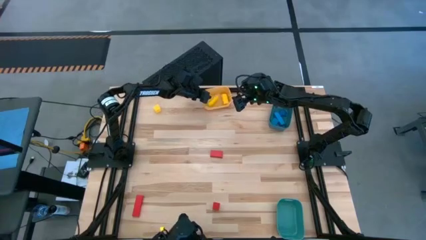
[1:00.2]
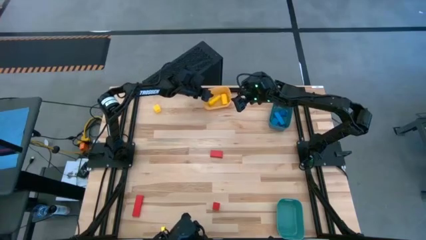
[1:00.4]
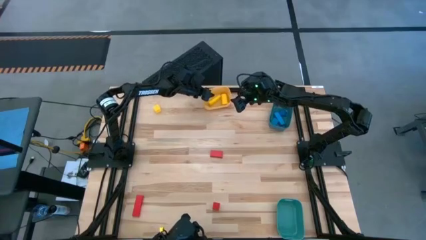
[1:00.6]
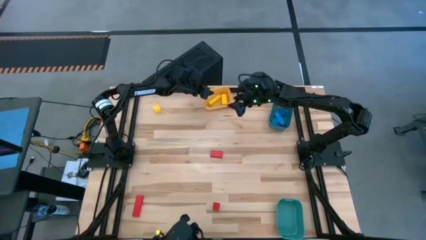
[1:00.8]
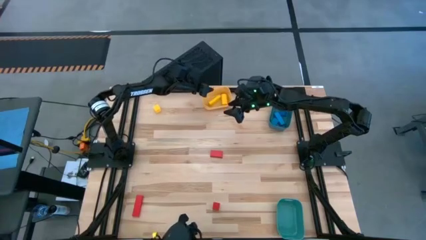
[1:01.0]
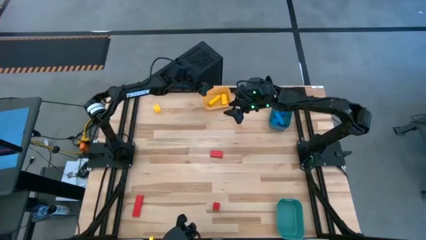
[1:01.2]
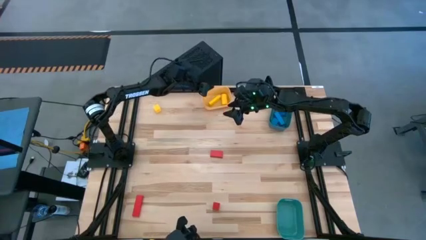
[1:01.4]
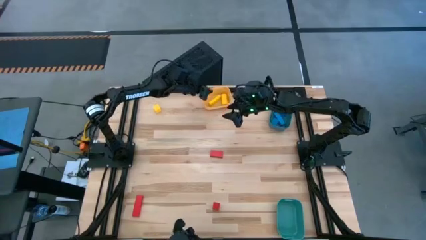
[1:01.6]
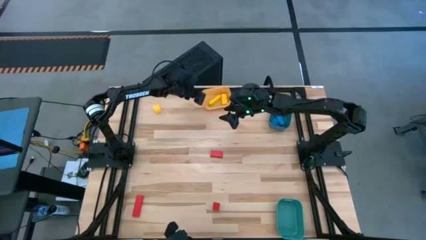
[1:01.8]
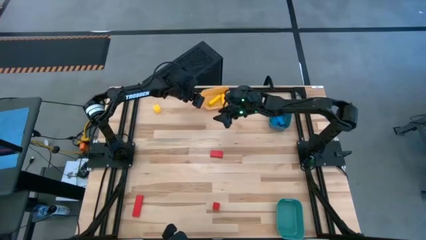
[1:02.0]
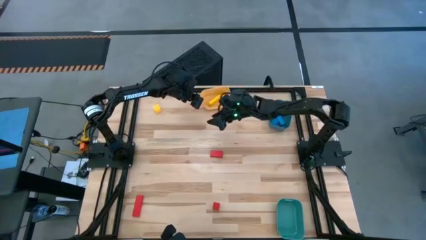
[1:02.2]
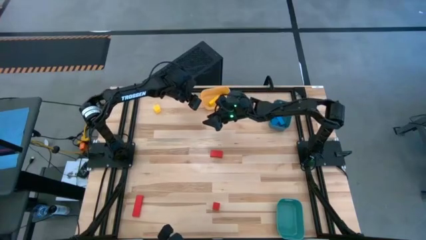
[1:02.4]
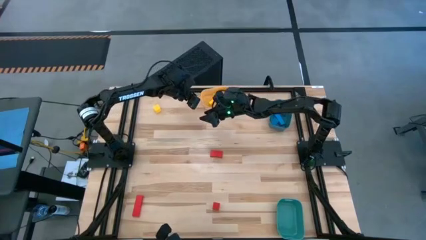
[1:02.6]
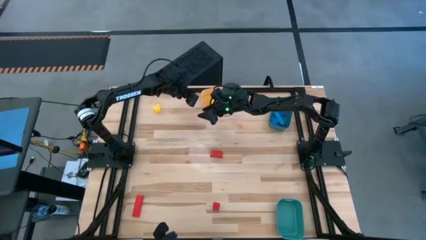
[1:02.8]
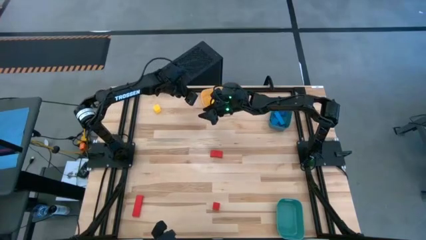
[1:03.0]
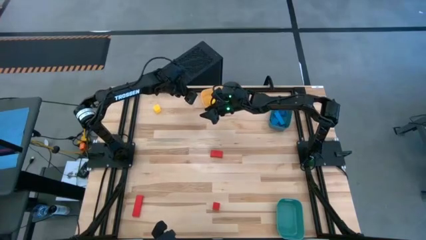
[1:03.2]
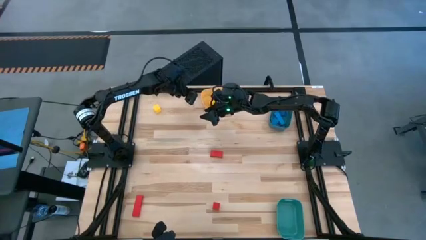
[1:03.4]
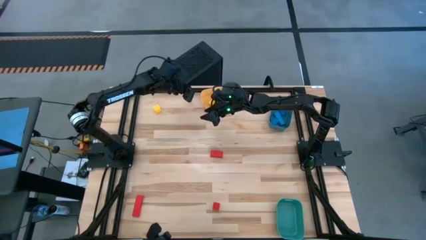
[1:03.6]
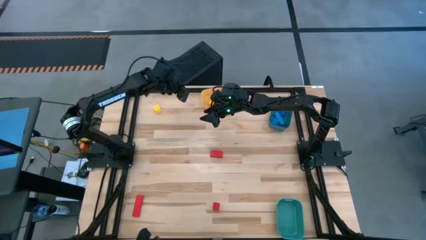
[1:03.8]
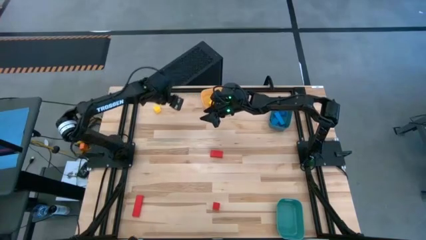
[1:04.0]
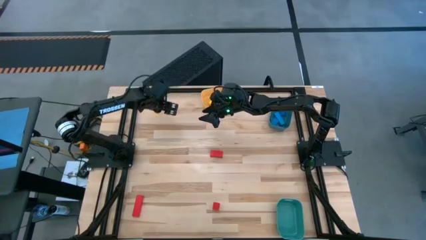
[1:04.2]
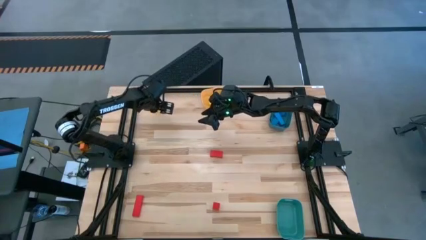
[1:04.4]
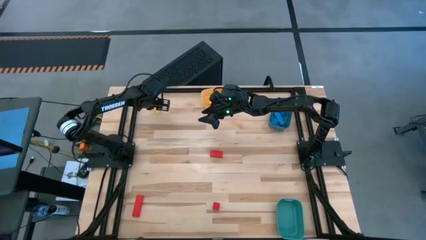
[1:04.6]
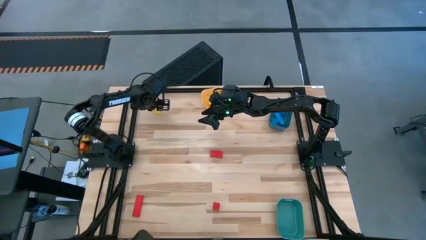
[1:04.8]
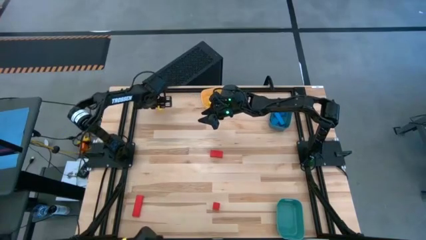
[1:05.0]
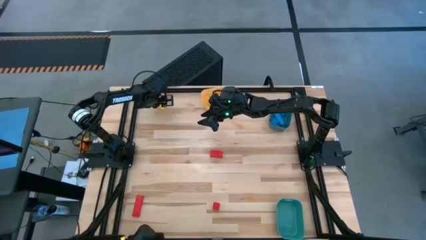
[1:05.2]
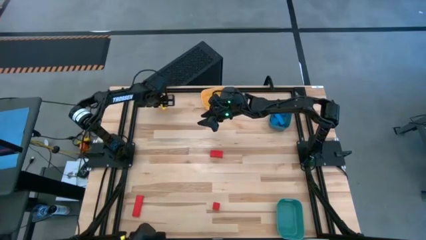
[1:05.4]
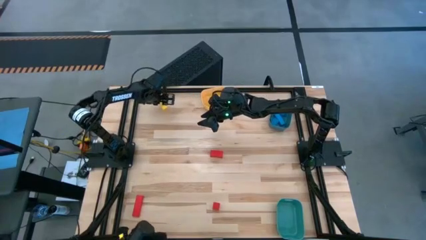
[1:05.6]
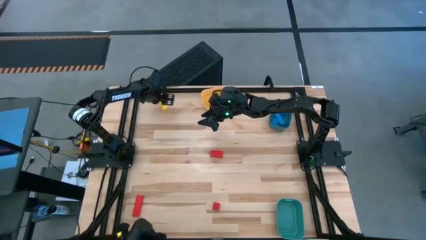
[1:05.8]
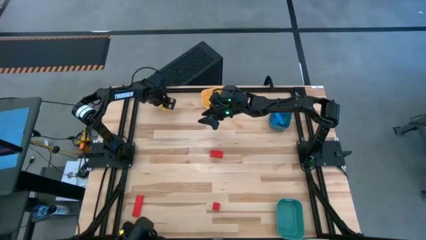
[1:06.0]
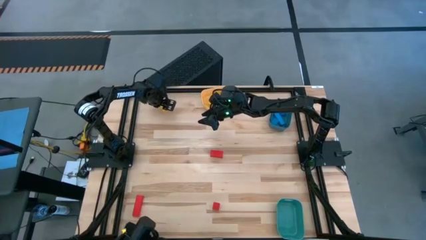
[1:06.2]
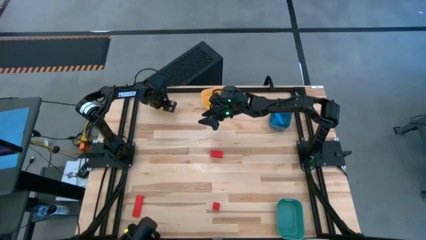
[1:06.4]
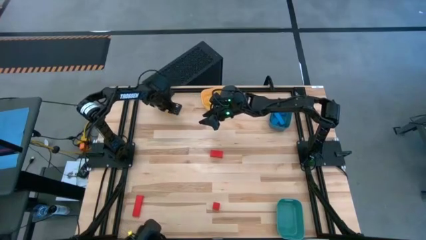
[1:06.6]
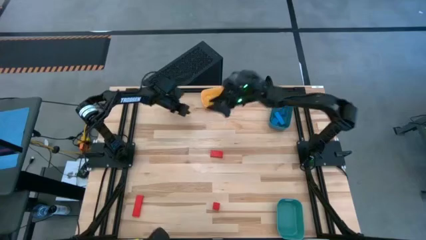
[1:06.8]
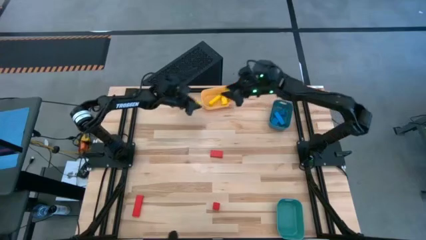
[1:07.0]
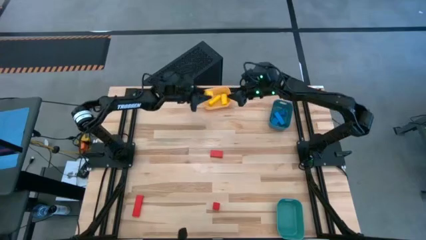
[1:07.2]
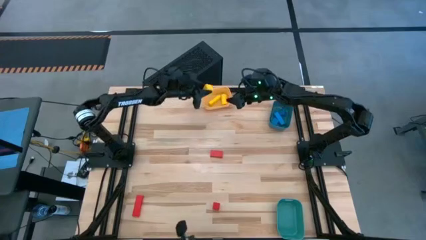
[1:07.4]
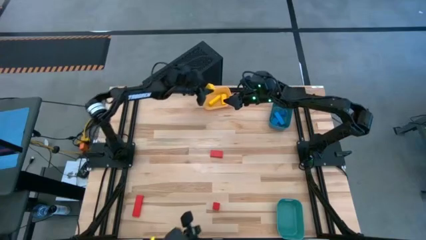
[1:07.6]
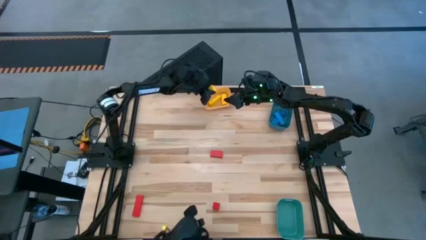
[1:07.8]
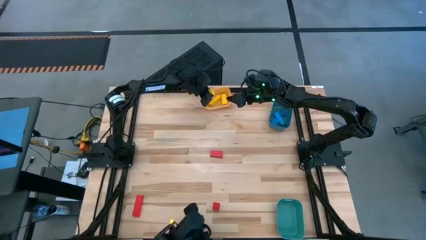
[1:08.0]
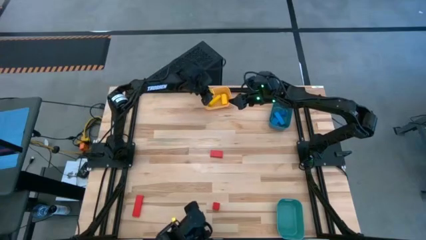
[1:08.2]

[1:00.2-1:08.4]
Task: Sort & place blocks by color
Put the yellow block into the yellow bin

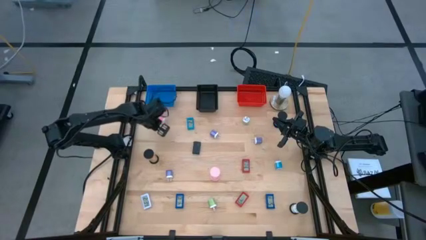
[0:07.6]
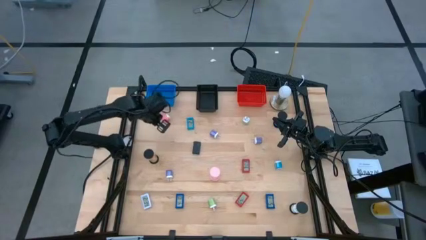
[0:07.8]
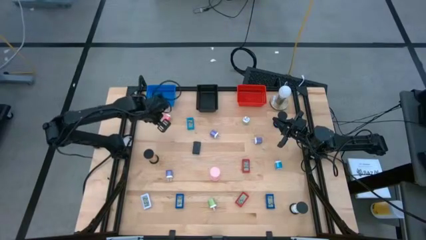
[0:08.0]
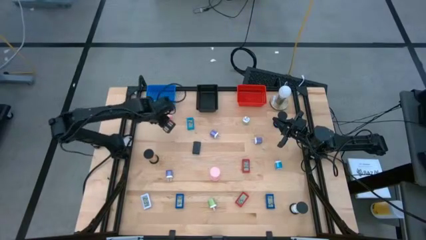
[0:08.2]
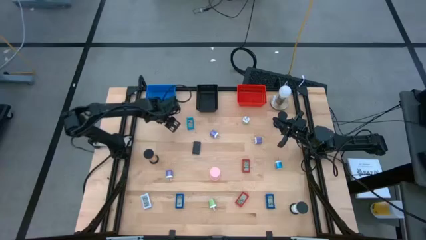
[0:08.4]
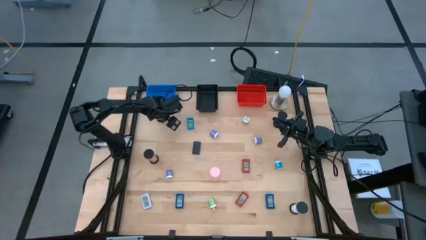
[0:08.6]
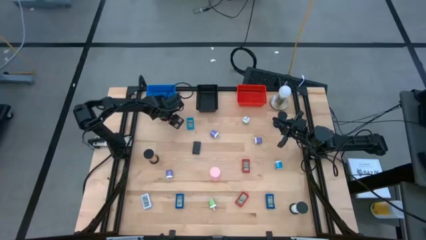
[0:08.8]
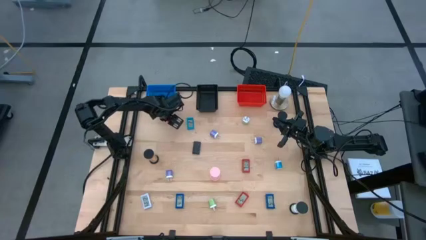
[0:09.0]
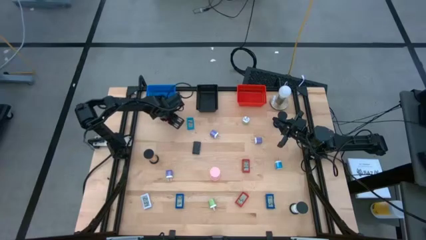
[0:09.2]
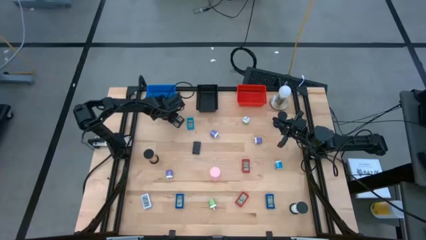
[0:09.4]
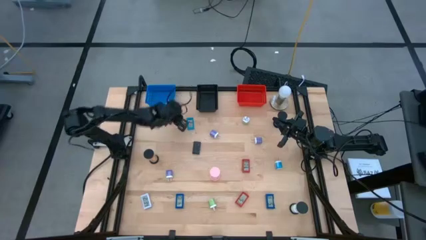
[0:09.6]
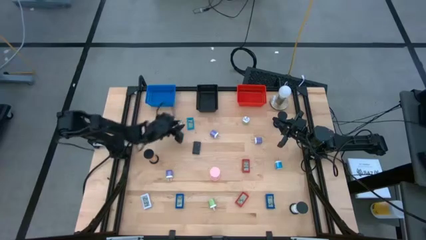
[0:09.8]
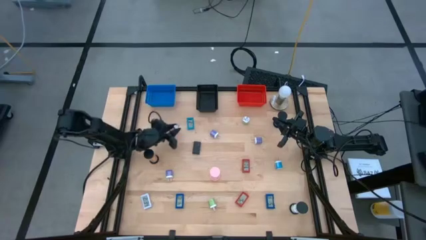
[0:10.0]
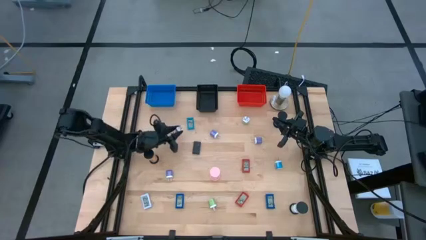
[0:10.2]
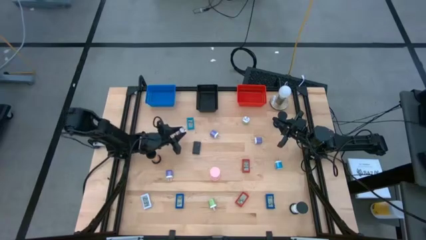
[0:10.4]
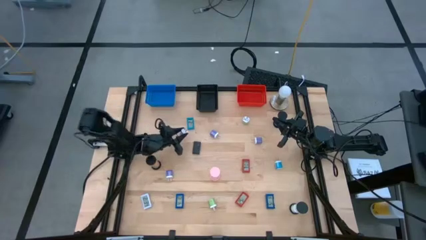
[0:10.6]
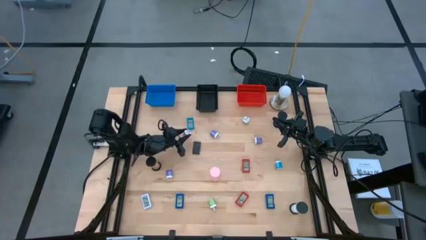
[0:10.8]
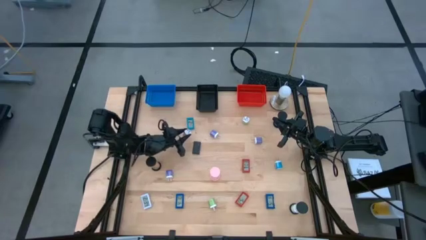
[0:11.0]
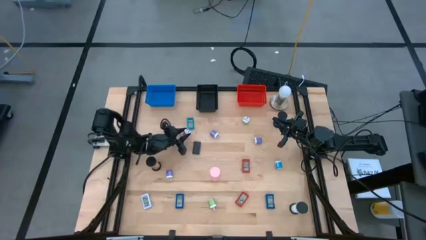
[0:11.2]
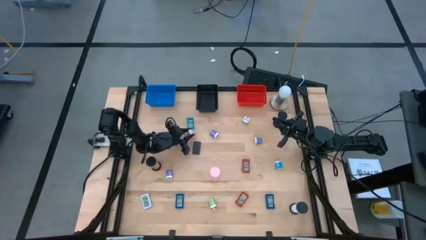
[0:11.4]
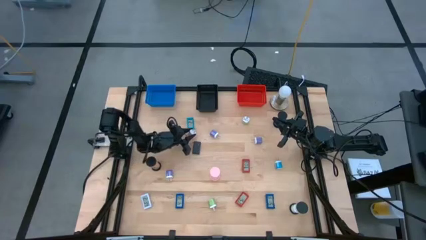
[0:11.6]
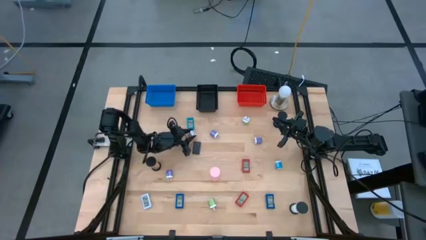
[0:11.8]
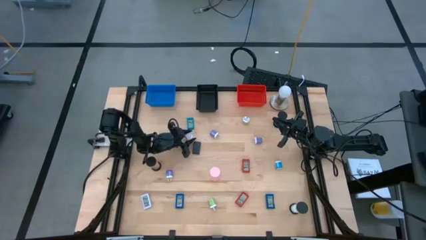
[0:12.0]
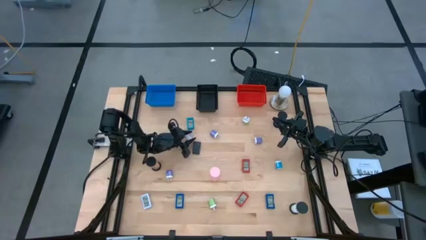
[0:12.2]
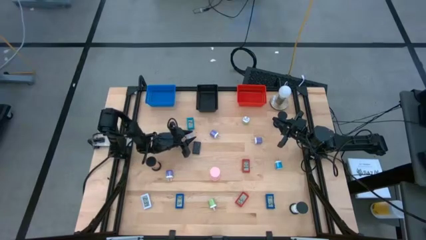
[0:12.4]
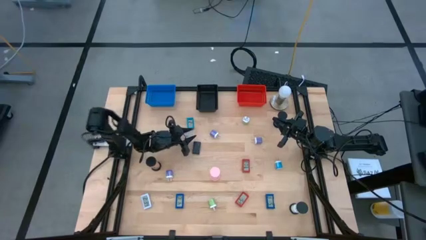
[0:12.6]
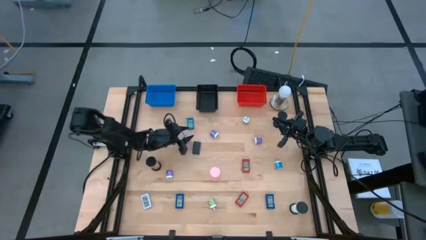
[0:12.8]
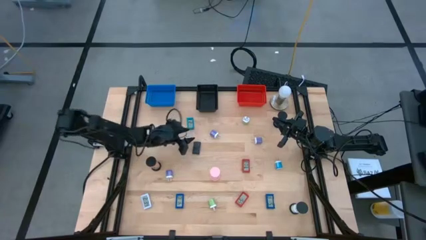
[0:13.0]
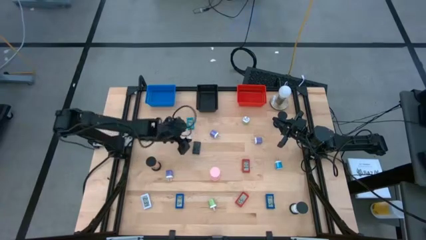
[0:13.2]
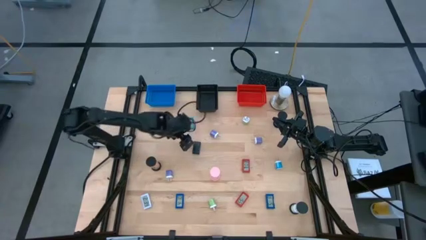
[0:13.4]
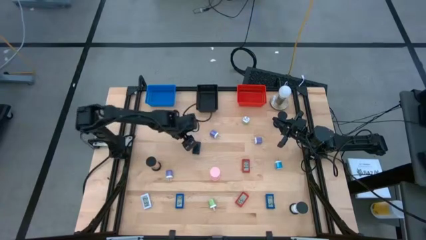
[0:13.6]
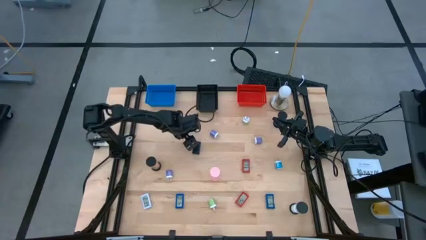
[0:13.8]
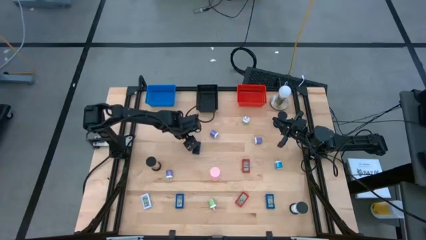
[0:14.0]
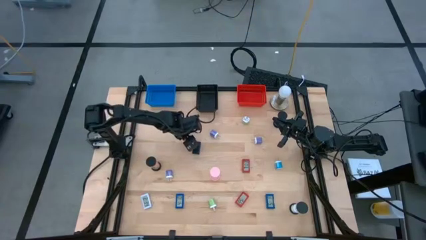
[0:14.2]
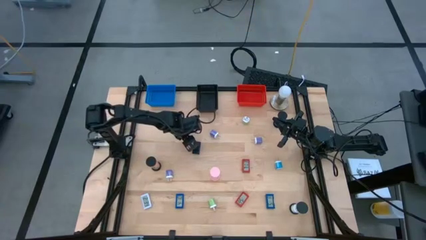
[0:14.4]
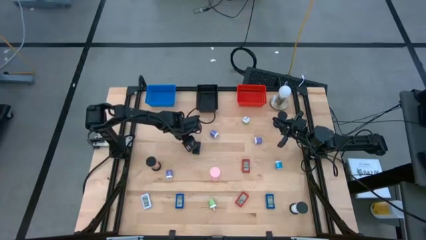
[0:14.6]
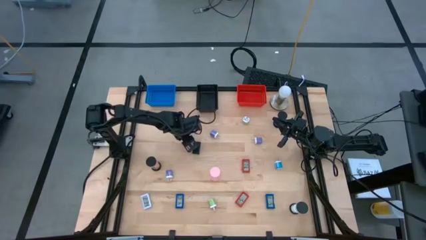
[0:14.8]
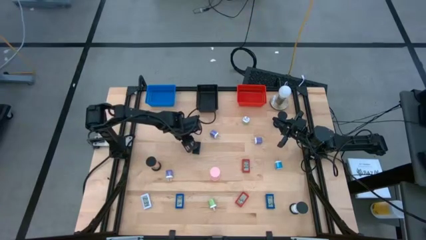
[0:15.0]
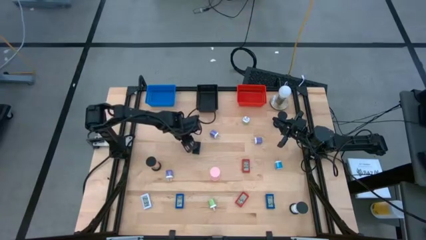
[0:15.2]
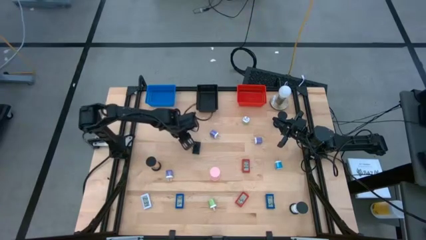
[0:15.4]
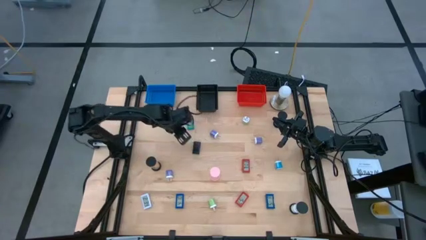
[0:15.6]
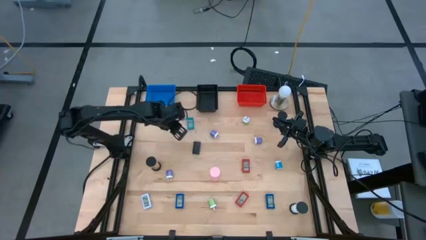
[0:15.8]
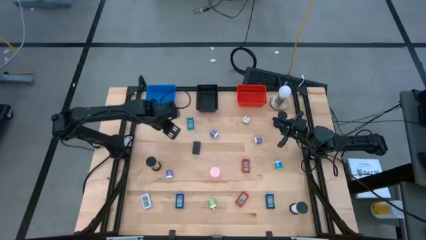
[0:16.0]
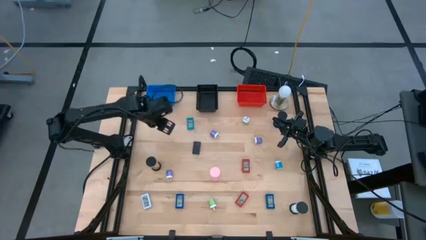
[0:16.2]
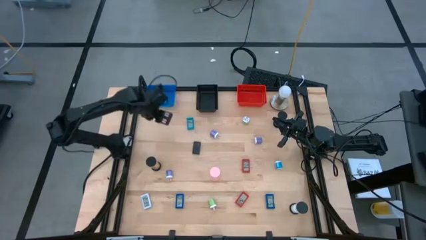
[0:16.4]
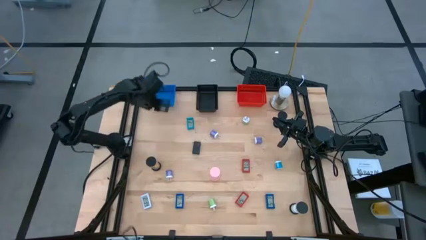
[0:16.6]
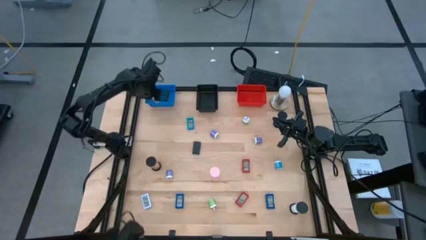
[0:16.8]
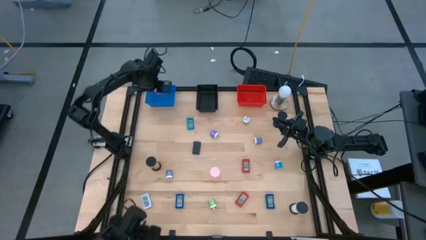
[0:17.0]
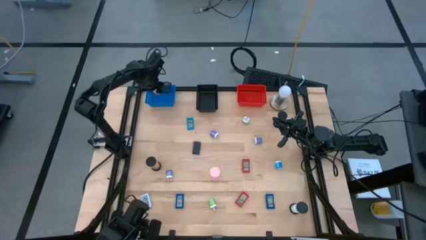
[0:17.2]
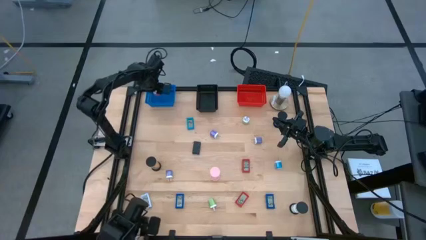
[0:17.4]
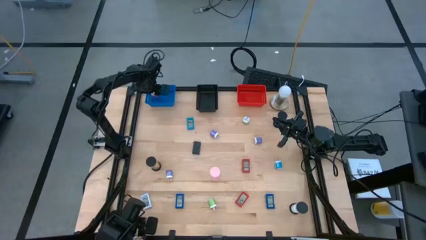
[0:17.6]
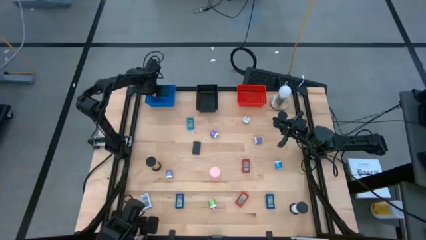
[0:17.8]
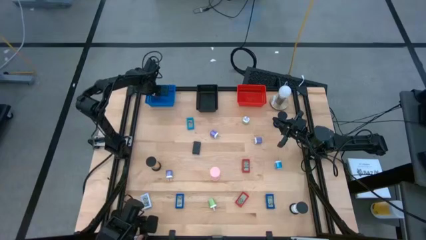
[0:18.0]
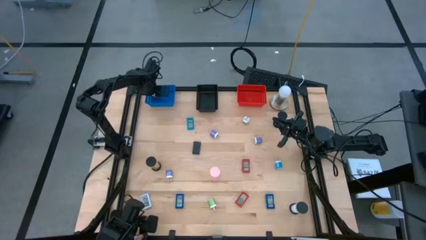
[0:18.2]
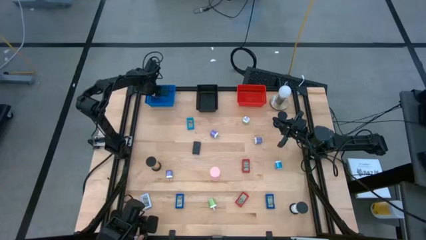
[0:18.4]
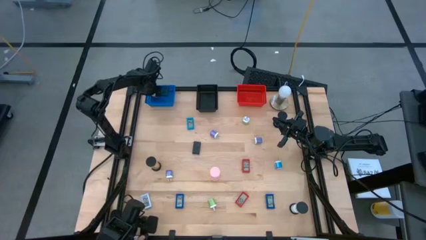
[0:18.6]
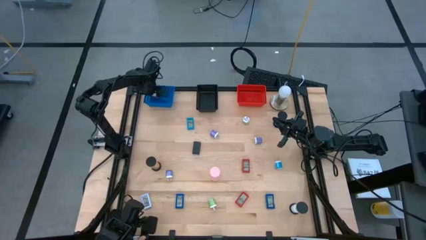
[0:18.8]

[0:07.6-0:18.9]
Task: Pick & Place Office items
Put the pink charger adapter into the blue bin
